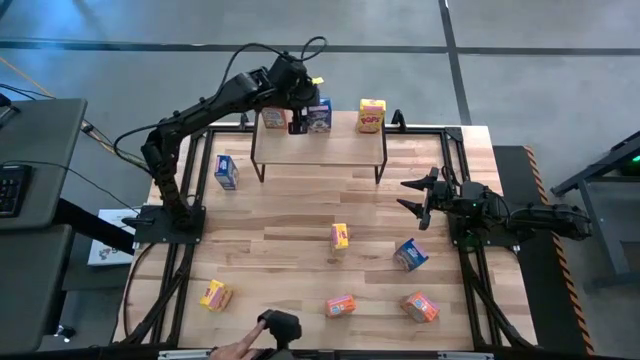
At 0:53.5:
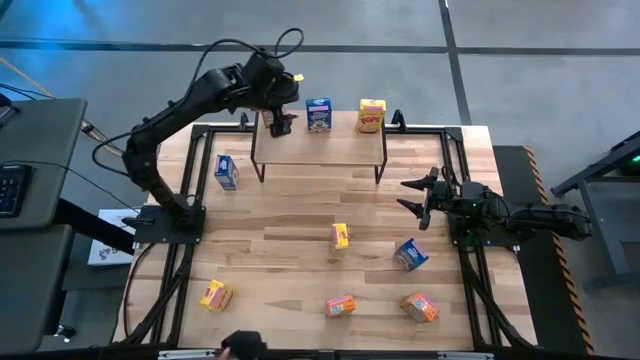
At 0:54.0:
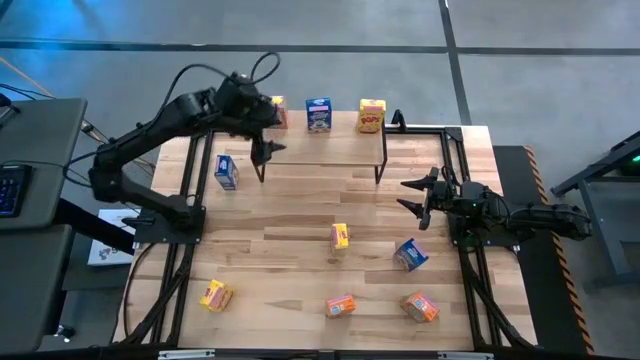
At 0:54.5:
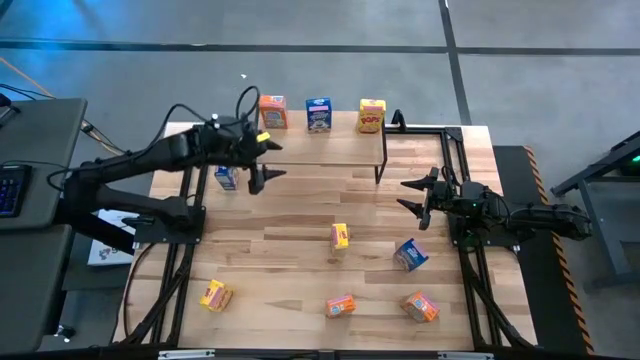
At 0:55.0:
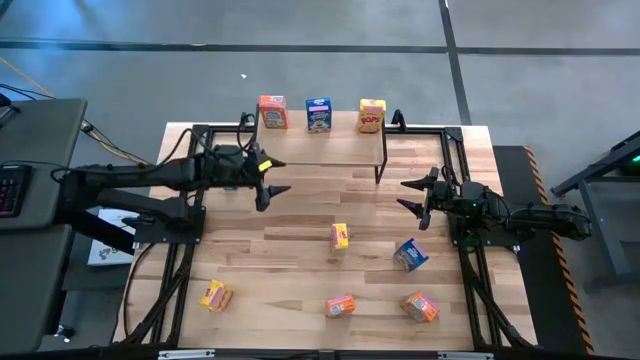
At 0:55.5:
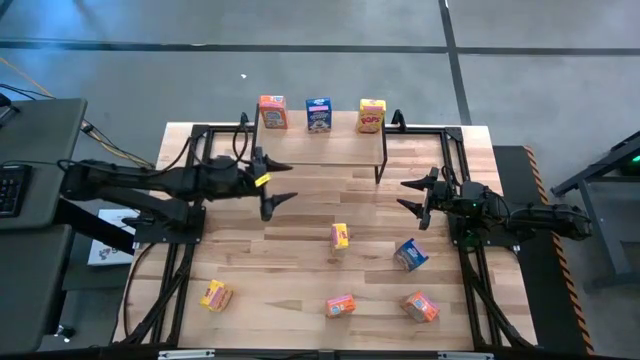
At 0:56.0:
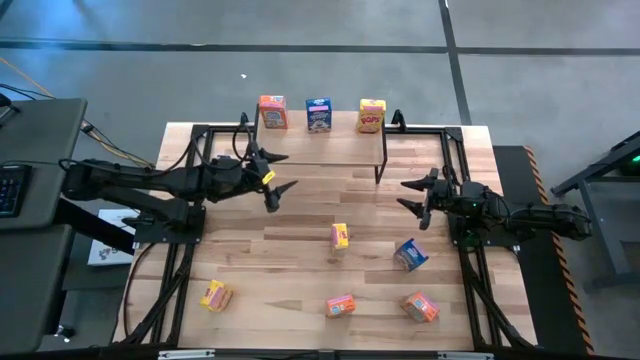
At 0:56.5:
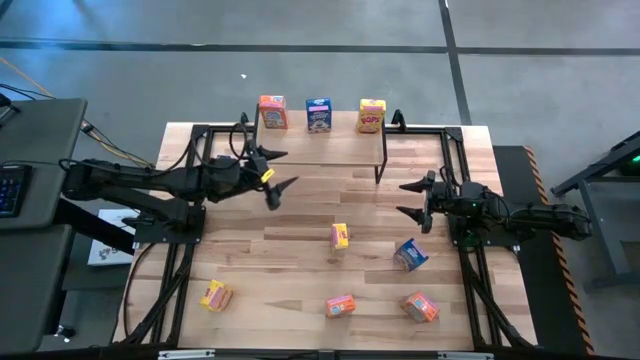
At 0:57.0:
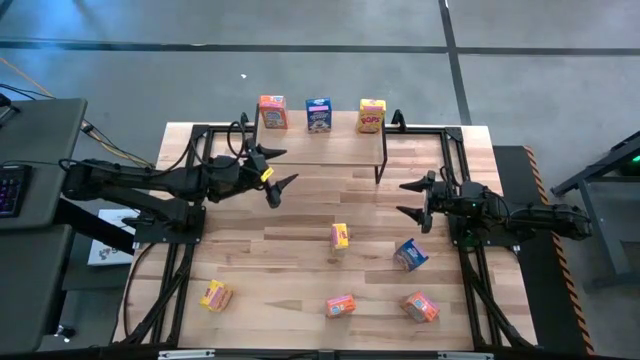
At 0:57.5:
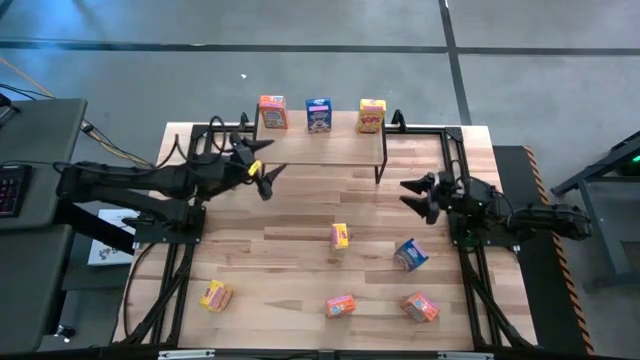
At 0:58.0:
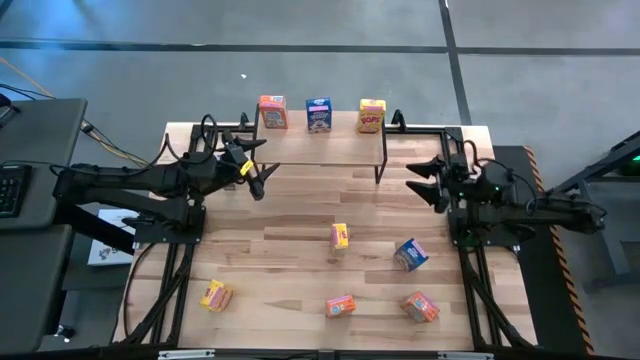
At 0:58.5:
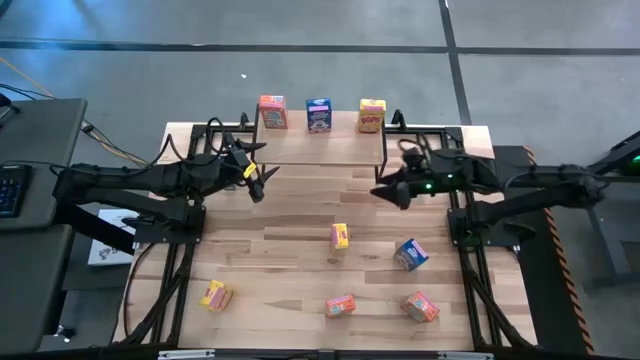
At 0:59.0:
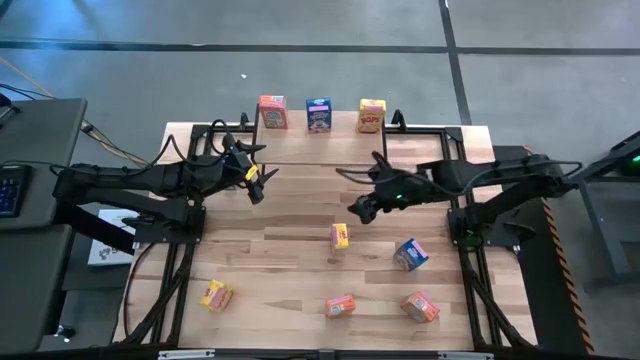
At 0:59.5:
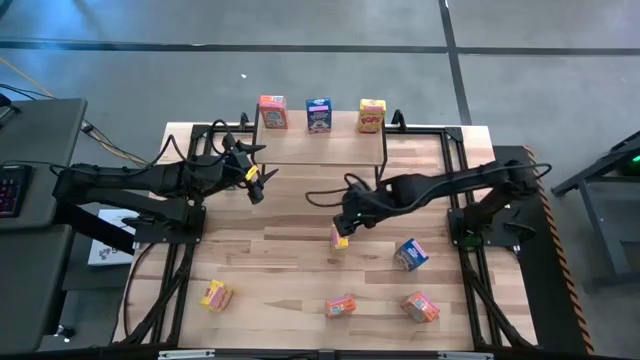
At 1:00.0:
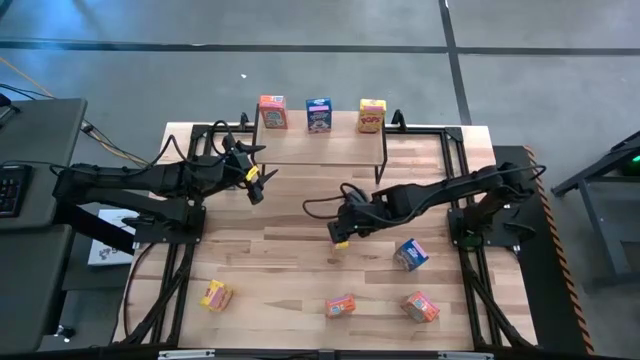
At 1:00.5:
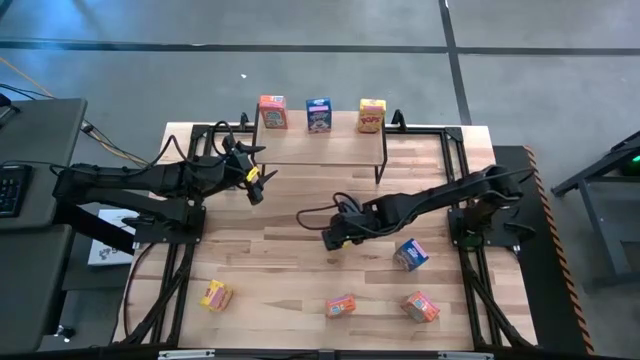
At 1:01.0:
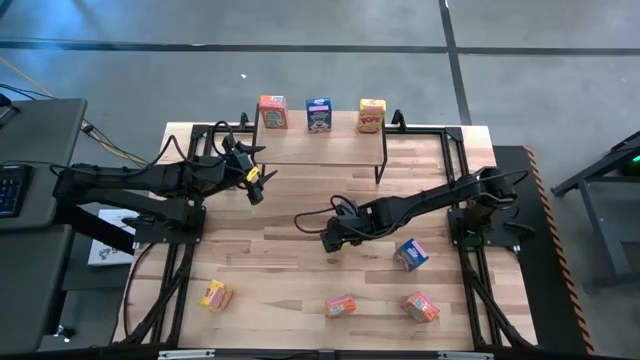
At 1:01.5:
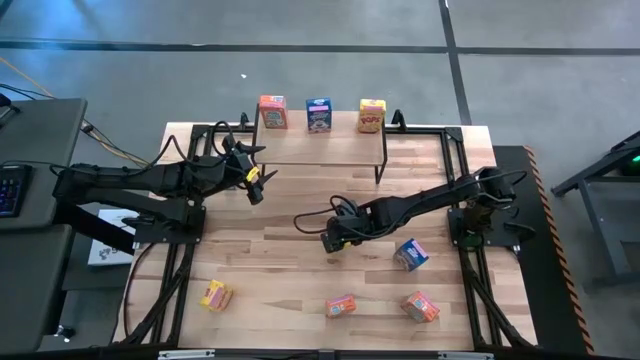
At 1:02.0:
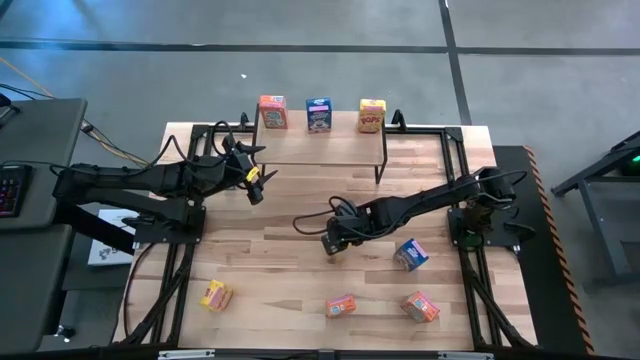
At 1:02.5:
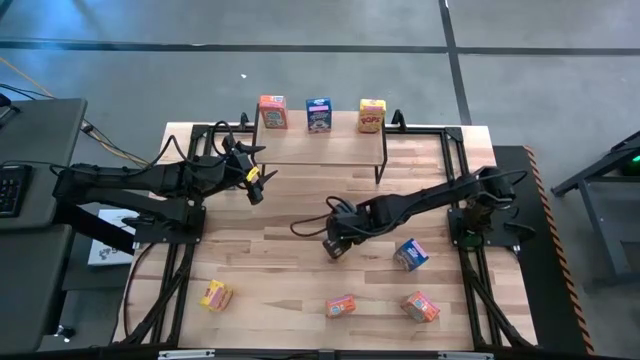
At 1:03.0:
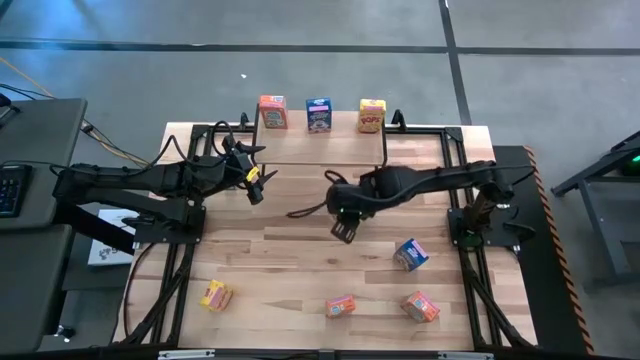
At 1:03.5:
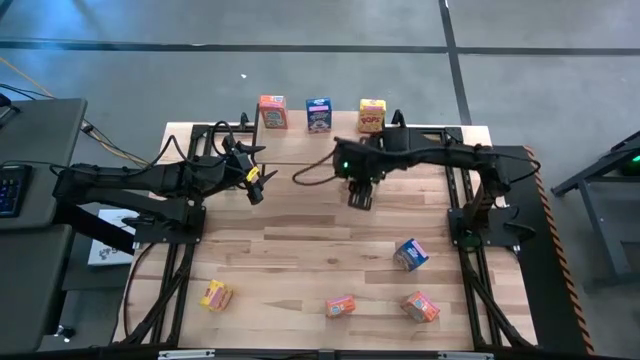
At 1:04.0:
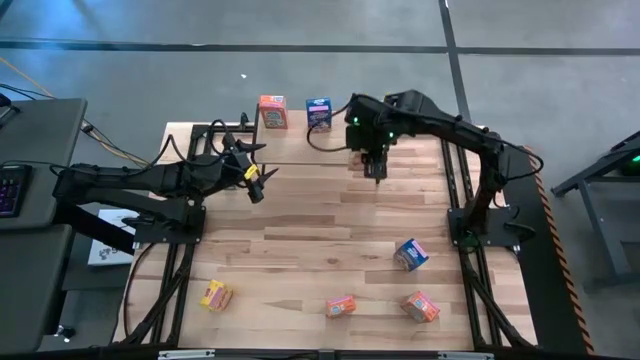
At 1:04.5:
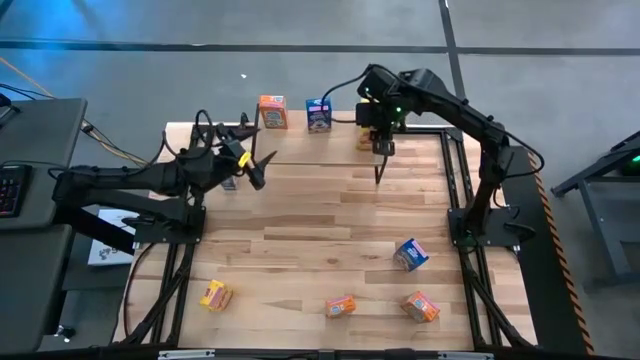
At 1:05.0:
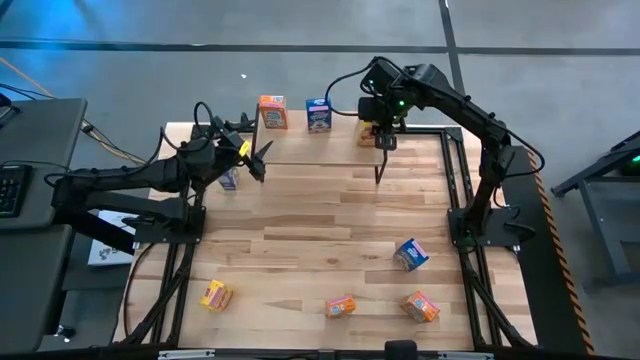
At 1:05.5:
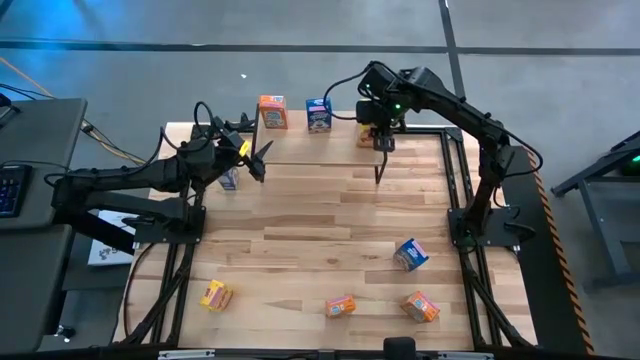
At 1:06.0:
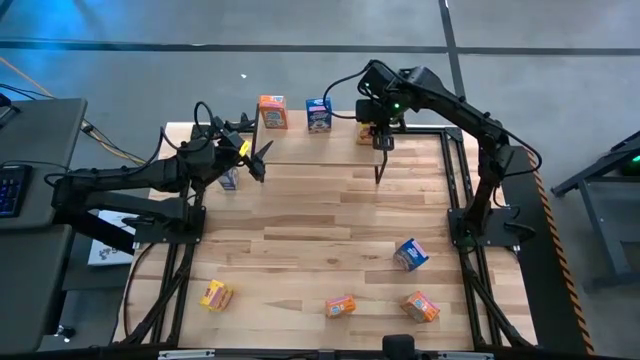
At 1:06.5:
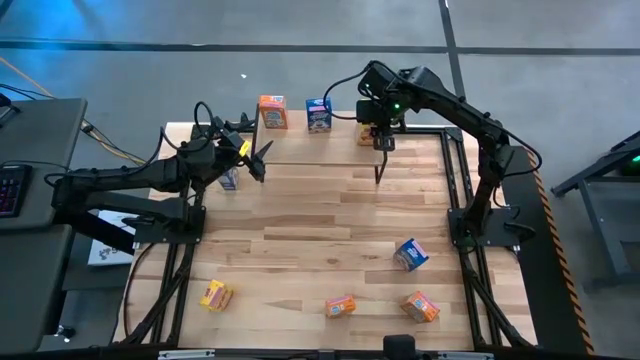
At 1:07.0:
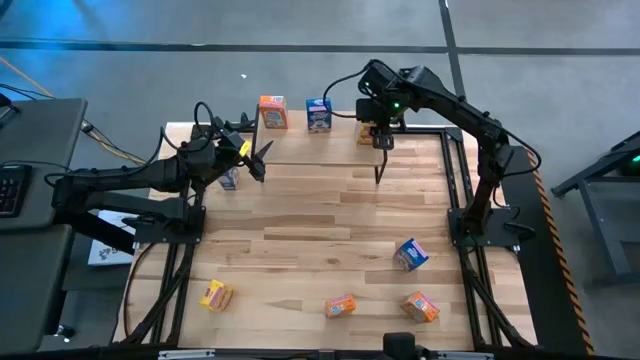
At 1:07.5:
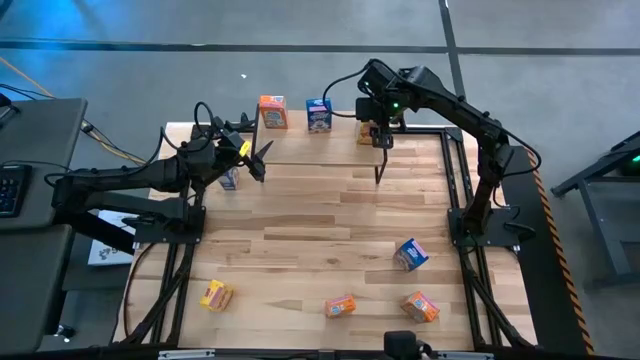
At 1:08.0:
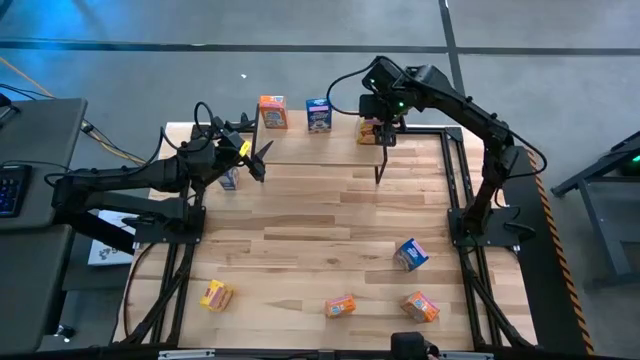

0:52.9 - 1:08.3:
Task: Stack cereal on shelf
Put the right yellow cereal box on the shelf aligned with the other yellow cereal box

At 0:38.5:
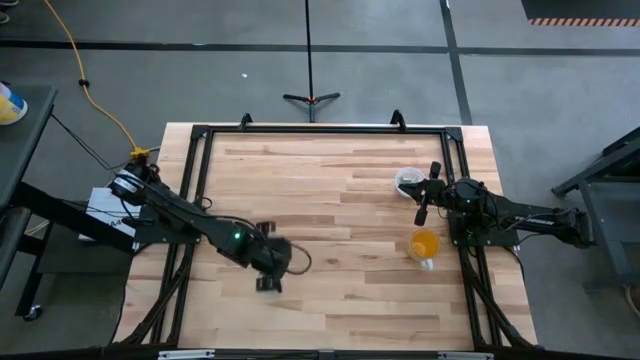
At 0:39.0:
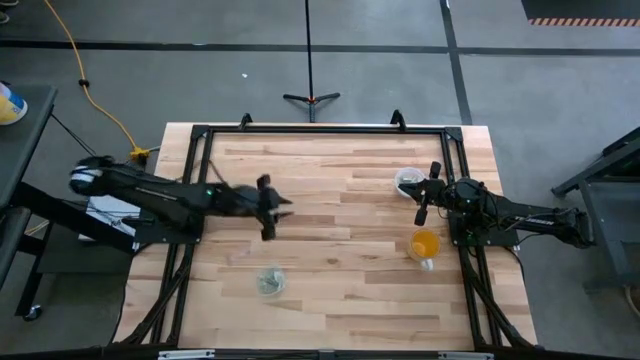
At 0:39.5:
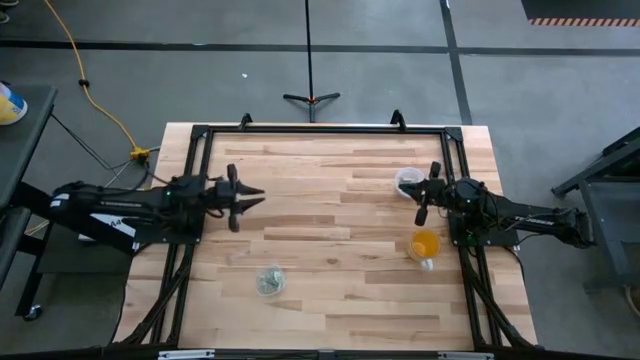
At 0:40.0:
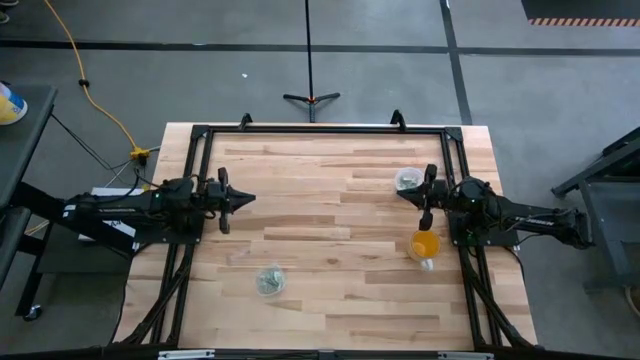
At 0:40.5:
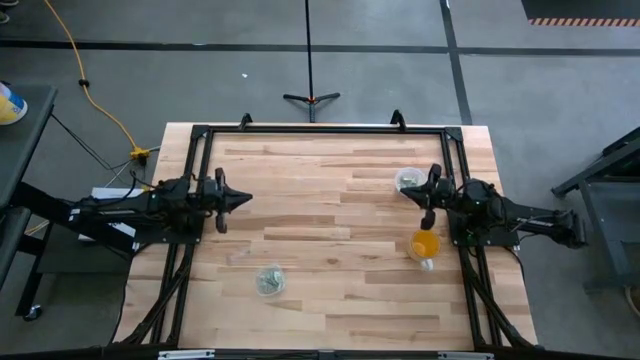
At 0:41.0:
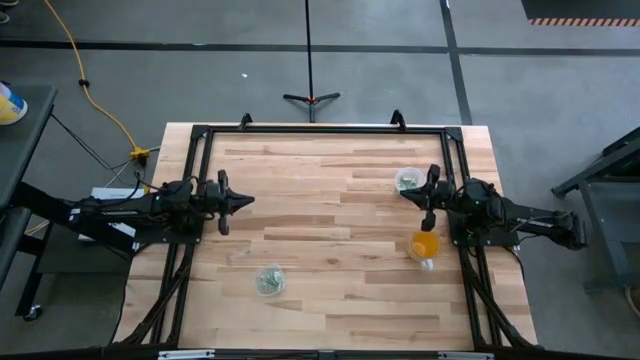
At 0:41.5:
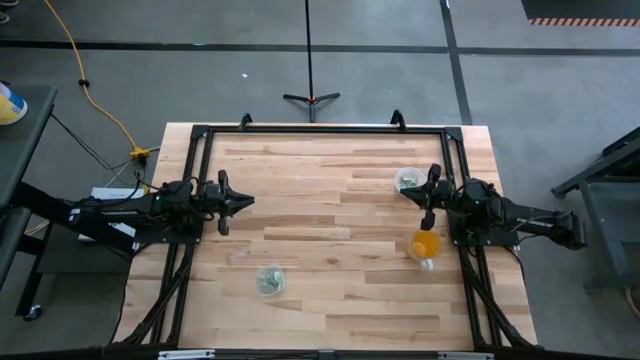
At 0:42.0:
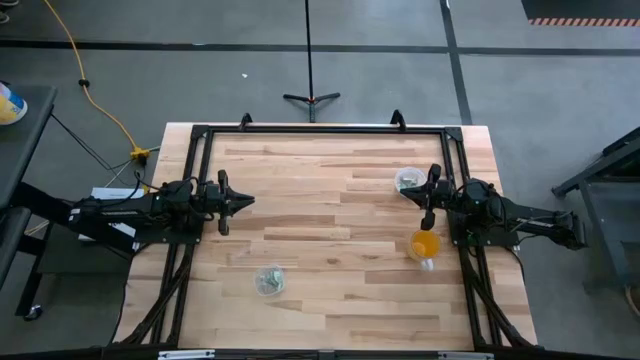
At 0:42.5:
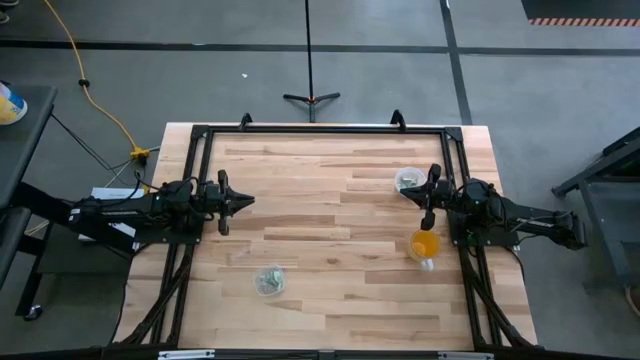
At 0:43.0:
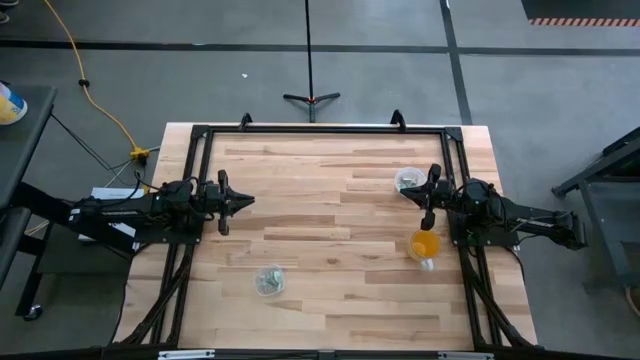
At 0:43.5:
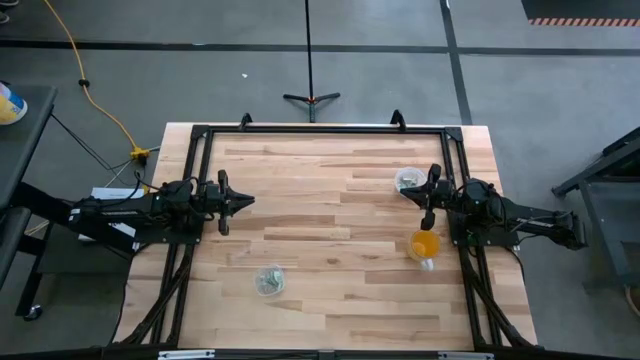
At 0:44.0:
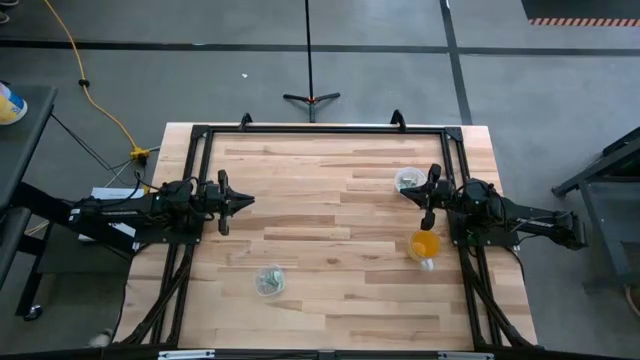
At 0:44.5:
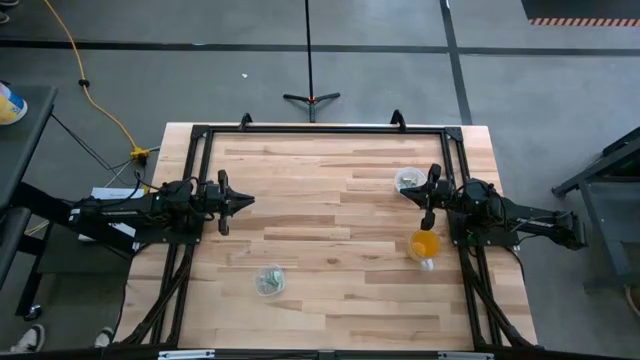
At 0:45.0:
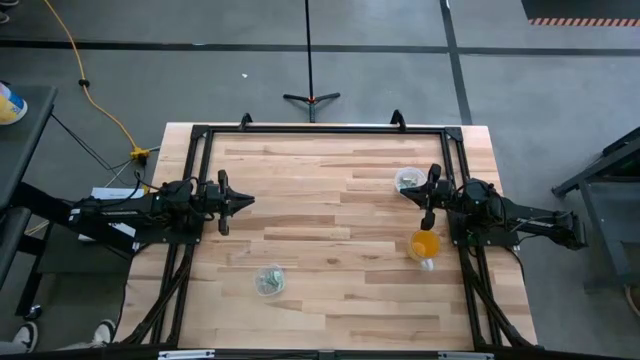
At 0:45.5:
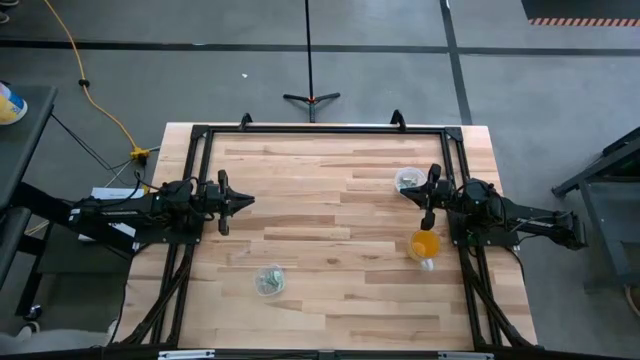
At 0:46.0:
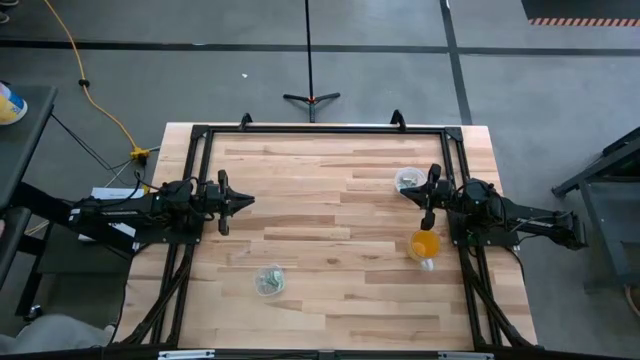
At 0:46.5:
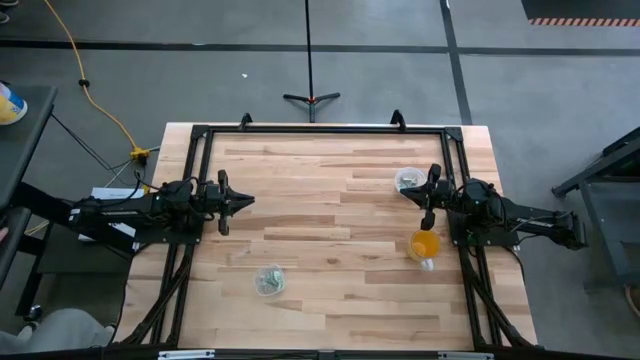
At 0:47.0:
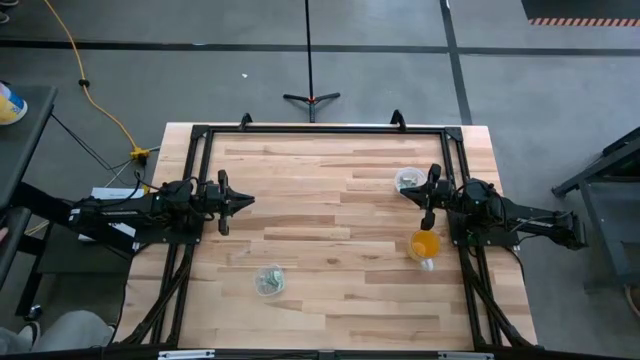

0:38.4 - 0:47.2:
Task: Pick and place Stevia / Truvia into bins
Return to Home Position
